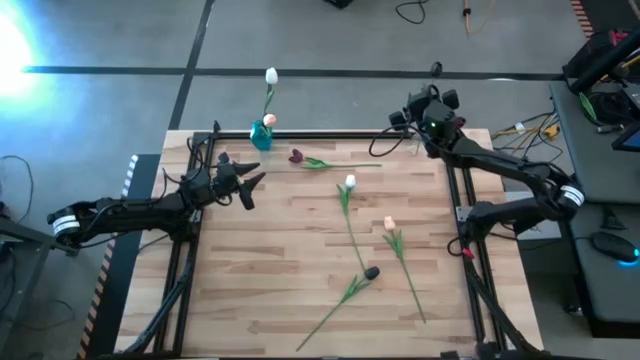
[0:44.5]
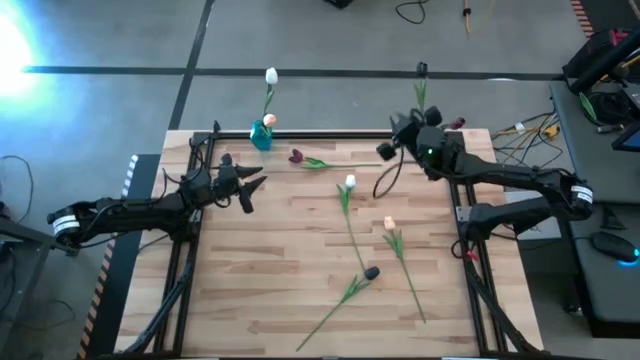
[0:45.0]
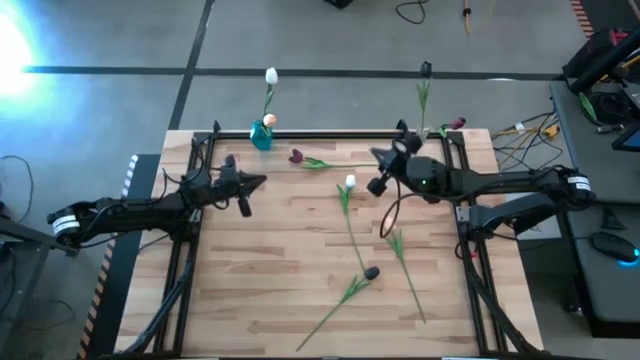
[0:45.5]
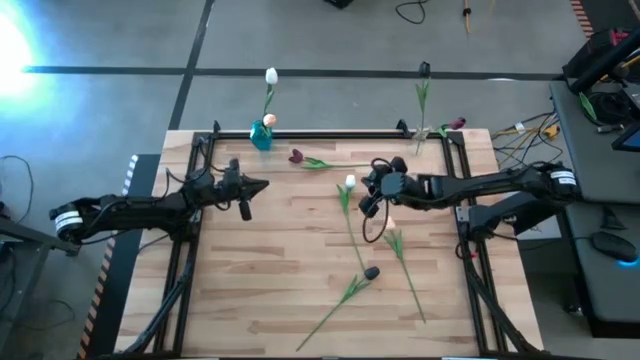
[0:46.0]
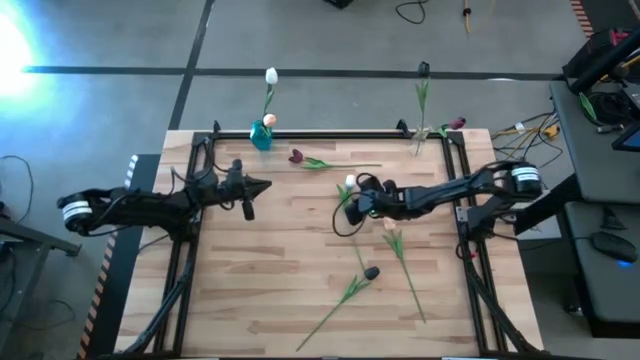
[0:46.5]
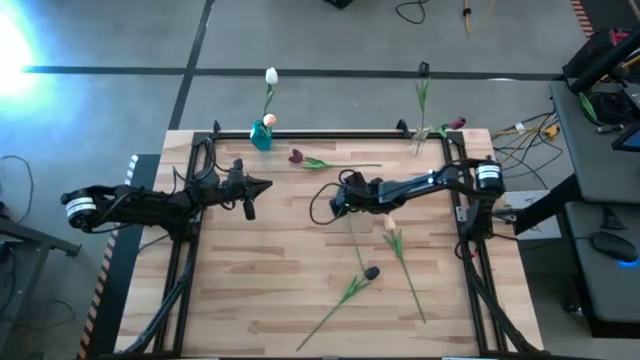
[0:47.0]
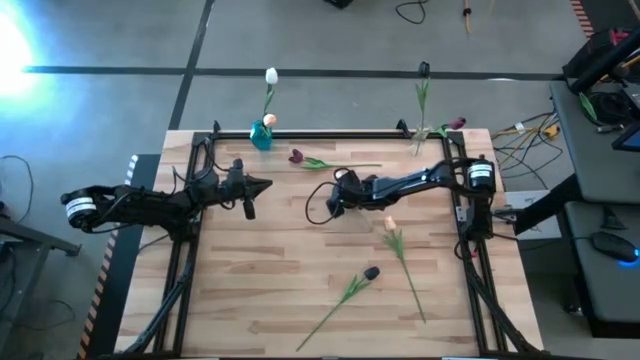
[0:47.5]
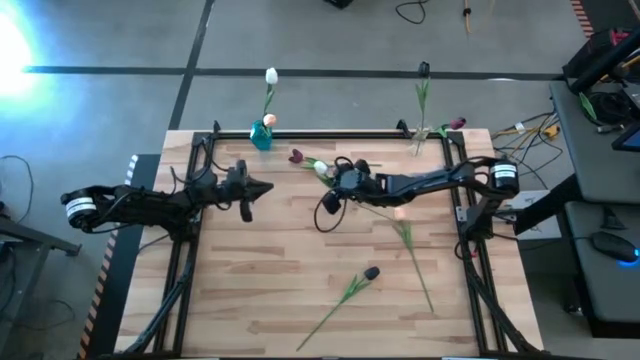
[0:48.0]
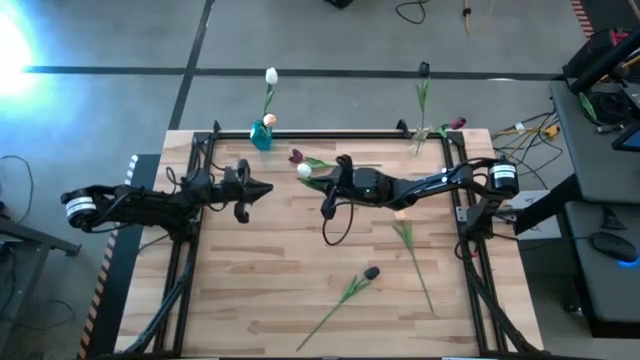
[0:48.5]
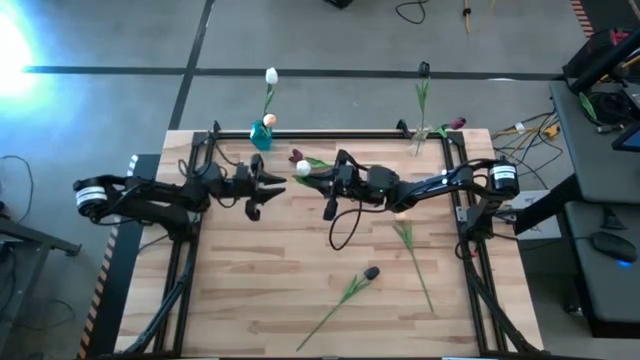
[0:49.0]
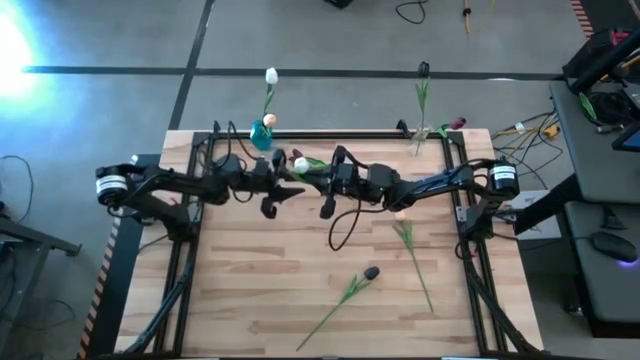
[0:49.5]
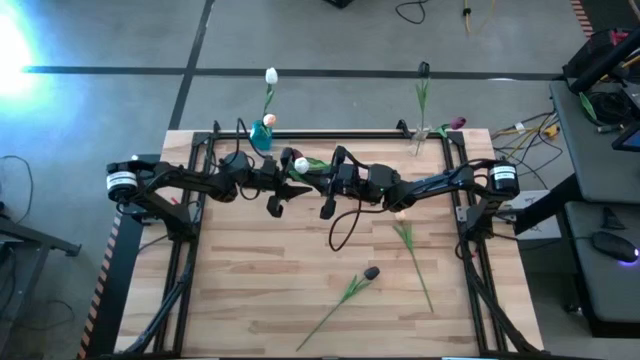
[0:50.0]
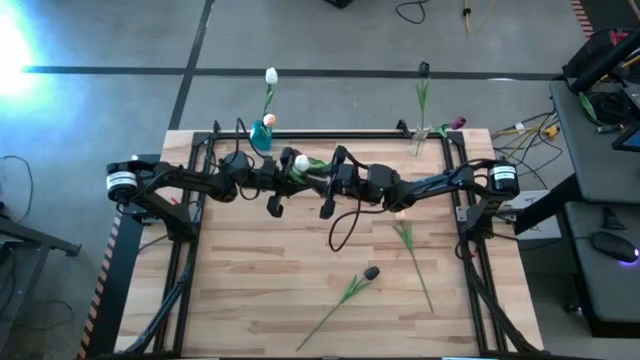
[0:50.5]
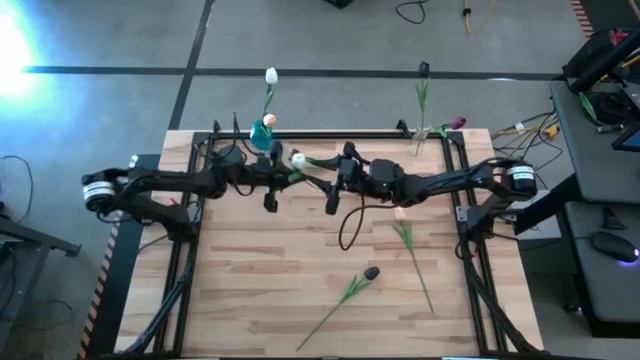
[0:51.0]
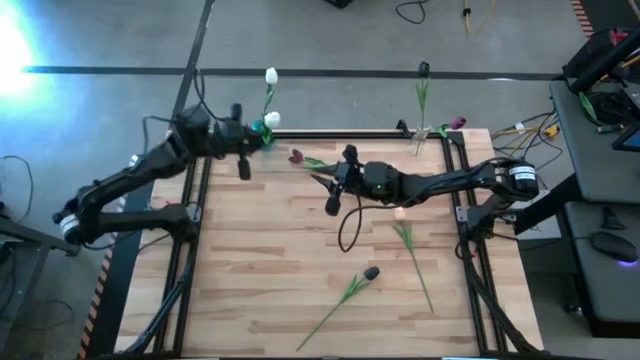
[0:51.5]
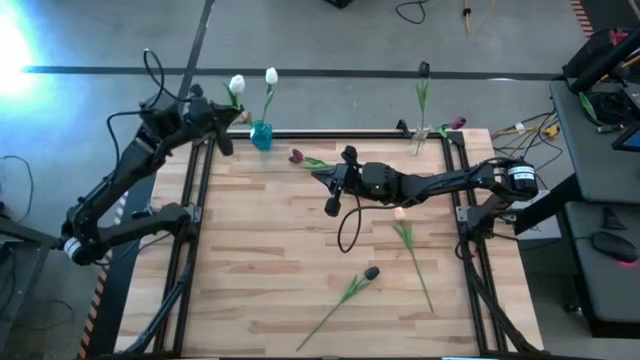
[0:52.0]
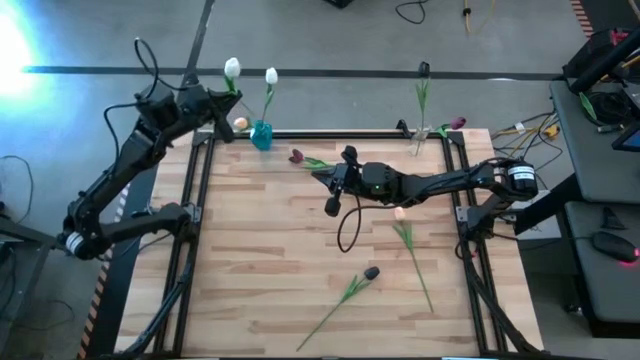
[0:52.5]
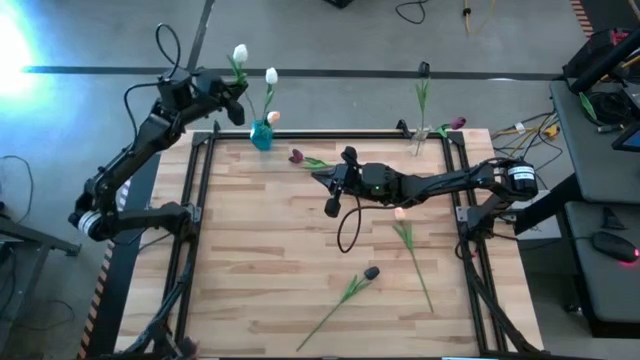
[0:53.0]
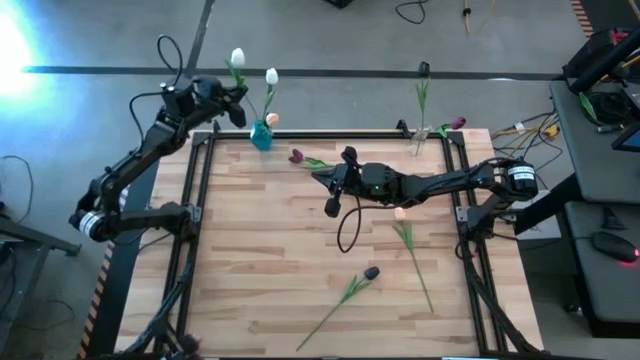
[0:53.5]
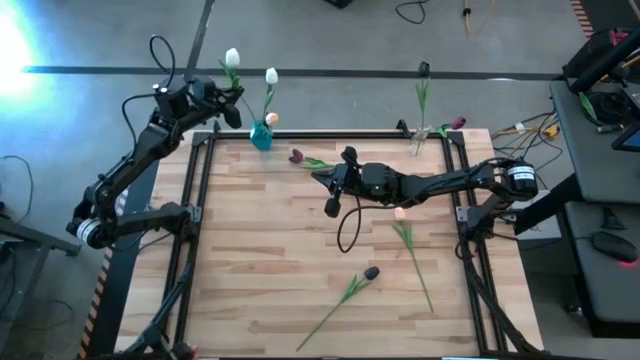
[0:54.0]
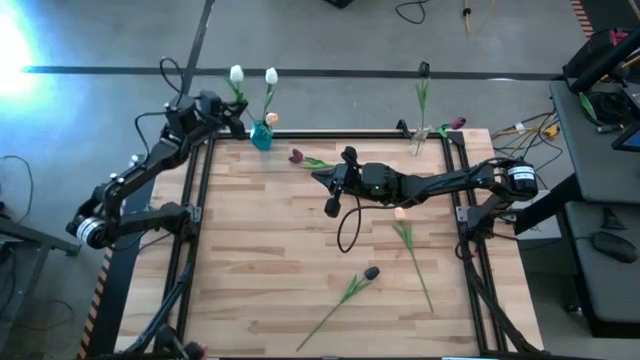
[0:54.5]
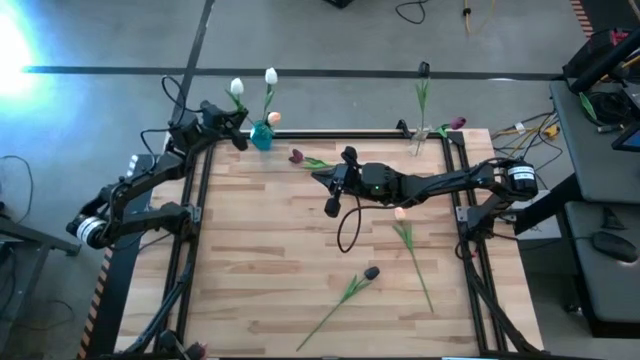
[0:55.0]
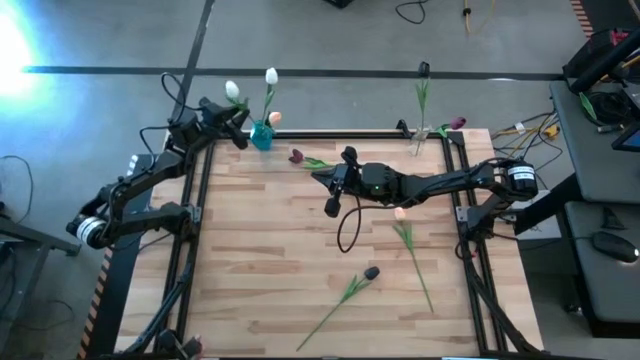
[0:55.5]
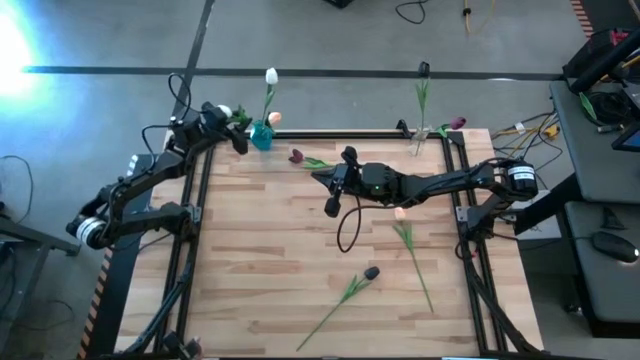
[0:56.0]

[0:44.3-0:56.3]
Task: Sort flowers into vase by color
Put the white flower into the blue vase

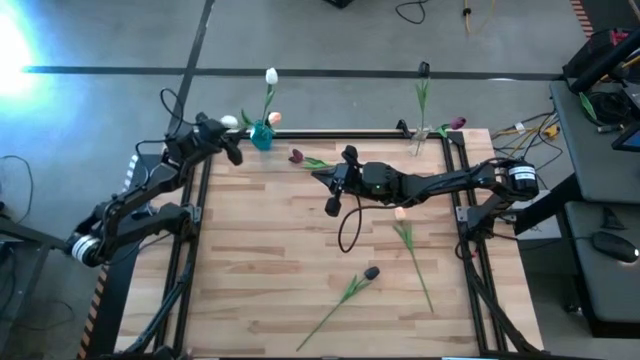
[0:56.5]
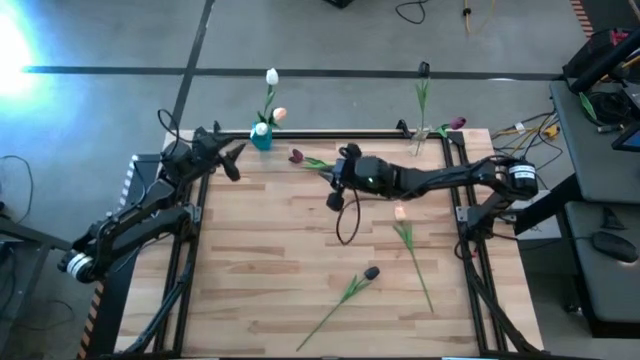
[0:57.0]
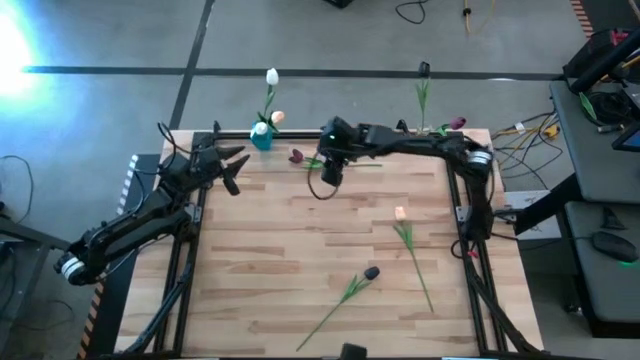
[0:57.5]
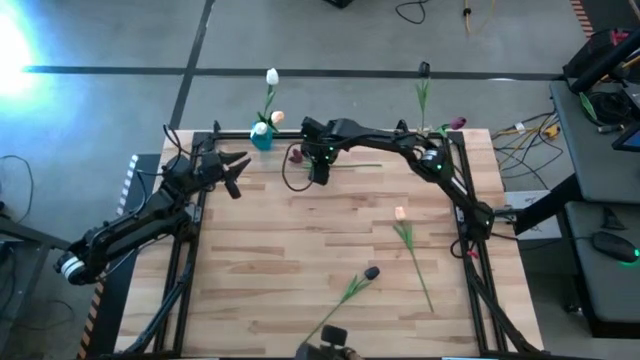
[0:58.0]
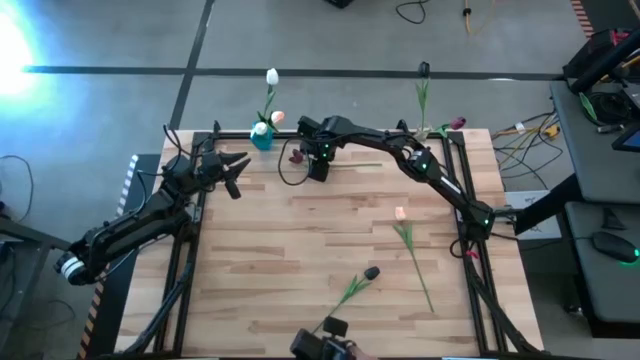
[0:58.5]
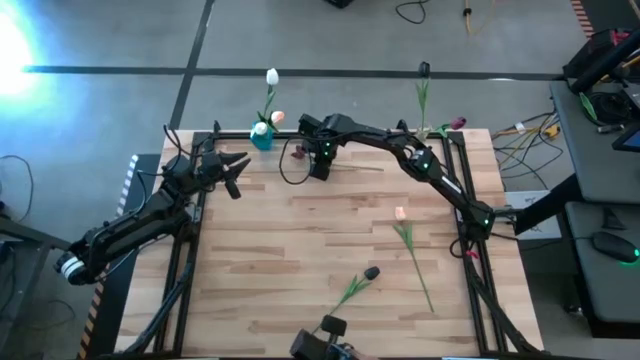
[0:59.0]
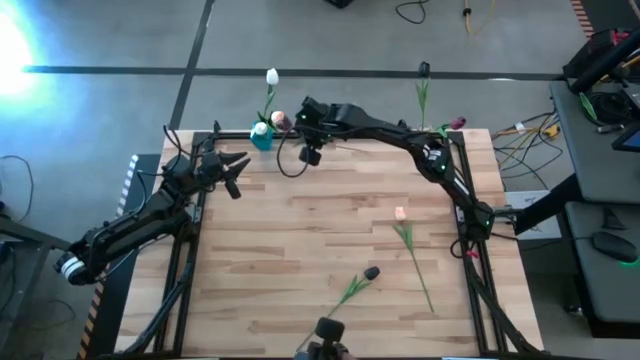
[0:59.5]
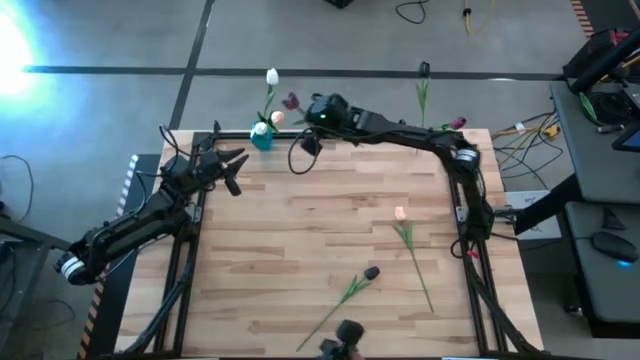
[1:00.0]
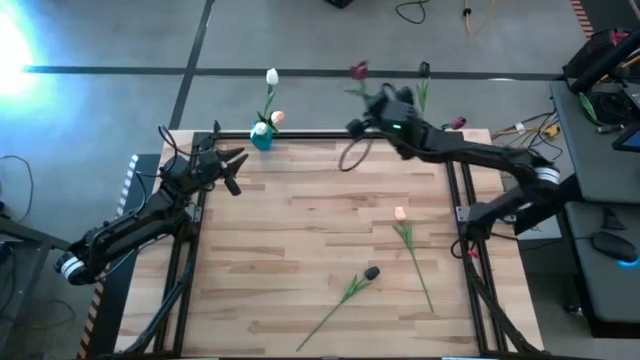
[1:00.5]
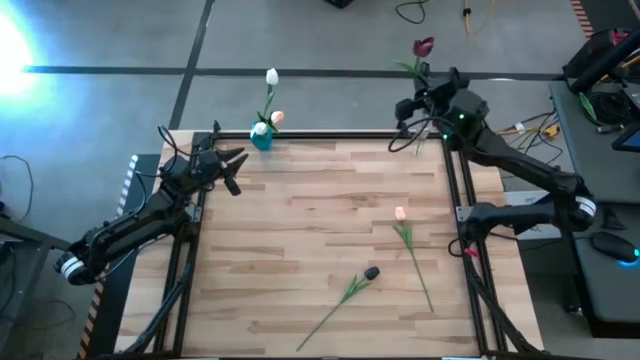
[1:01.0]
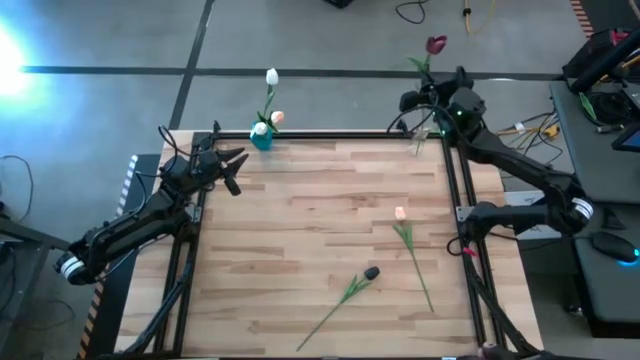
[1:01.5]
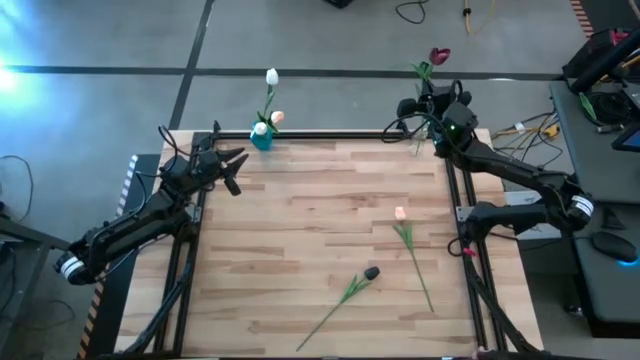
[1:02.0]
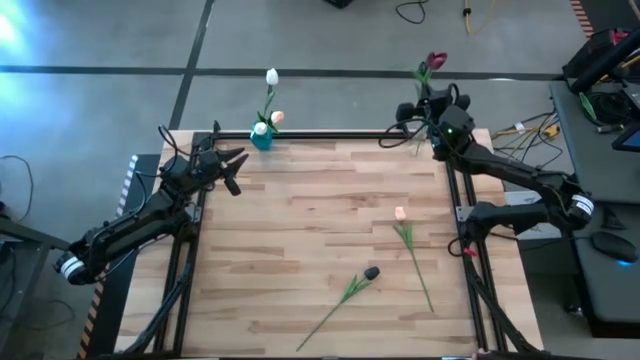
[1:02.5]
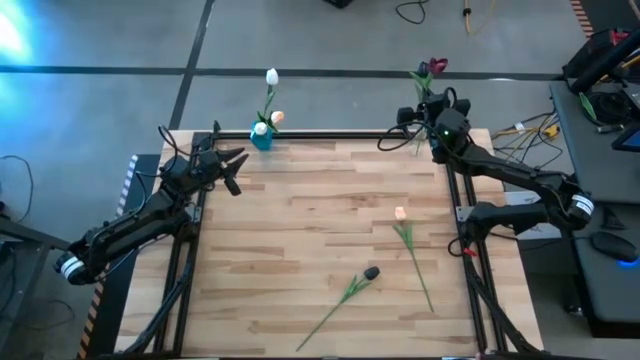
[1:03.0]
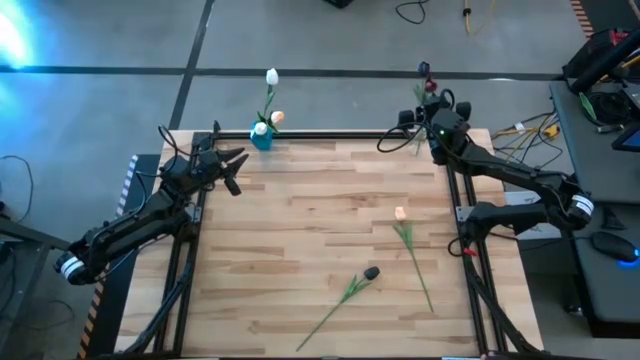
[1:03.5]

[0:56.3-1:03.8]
Put the dark red flower in the transparent vase
